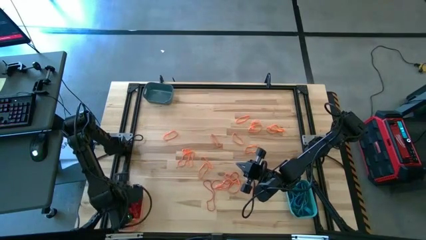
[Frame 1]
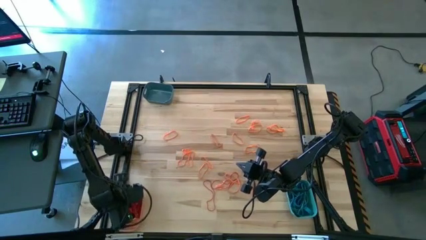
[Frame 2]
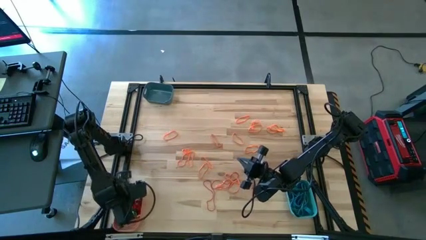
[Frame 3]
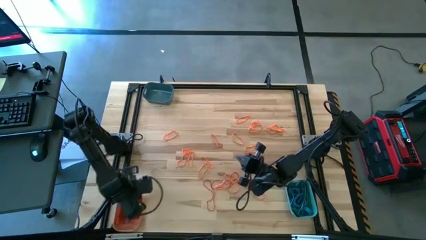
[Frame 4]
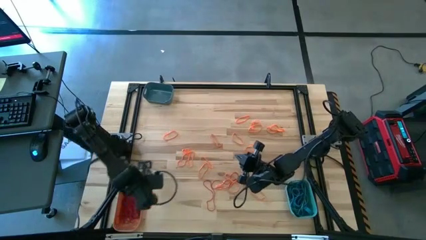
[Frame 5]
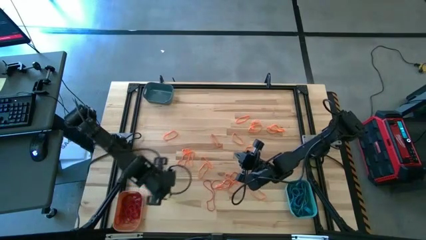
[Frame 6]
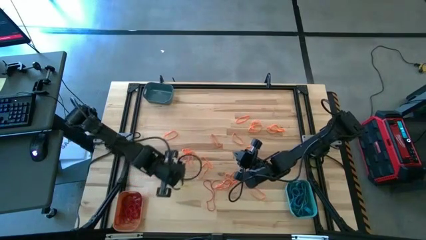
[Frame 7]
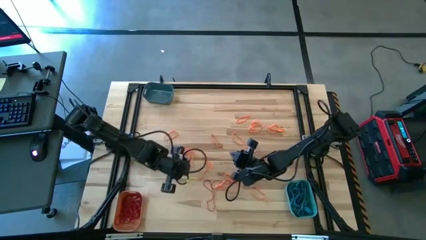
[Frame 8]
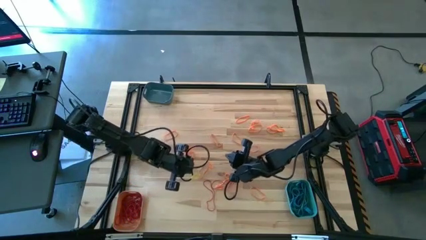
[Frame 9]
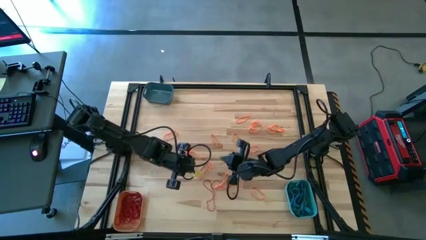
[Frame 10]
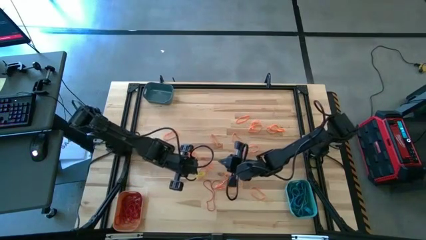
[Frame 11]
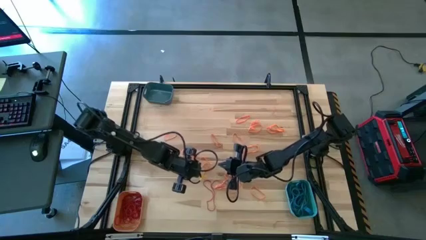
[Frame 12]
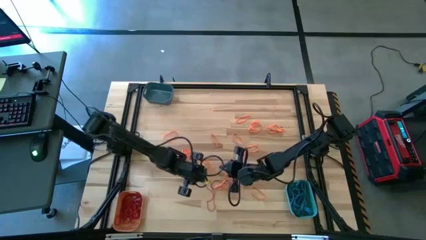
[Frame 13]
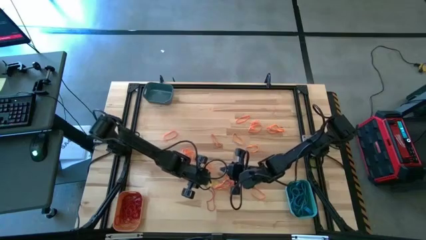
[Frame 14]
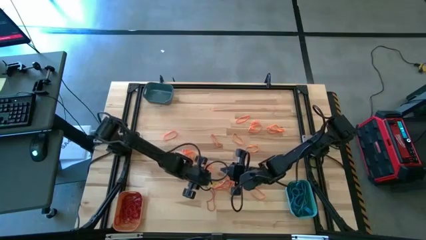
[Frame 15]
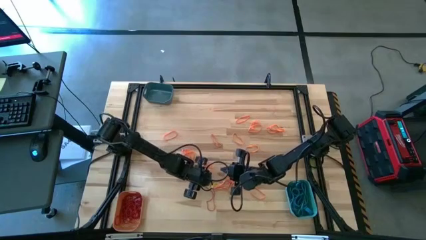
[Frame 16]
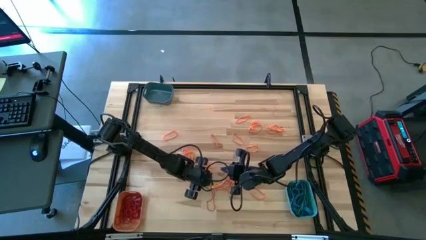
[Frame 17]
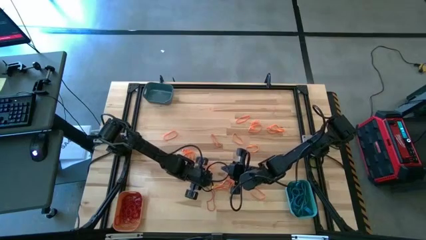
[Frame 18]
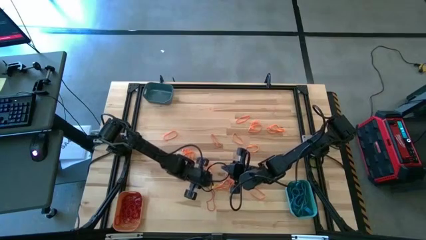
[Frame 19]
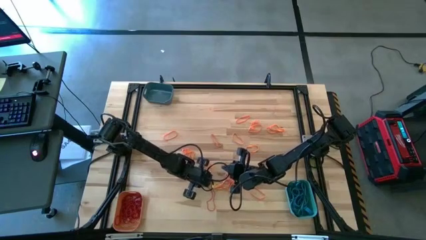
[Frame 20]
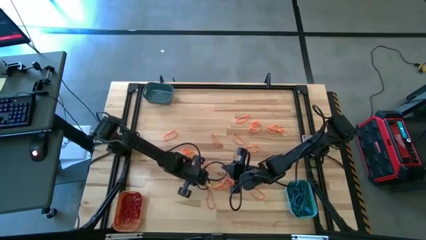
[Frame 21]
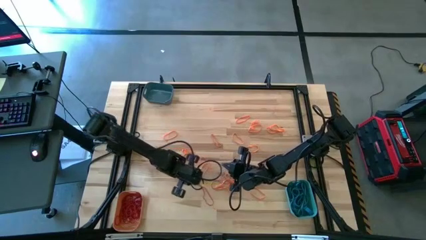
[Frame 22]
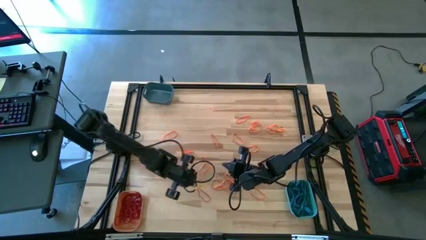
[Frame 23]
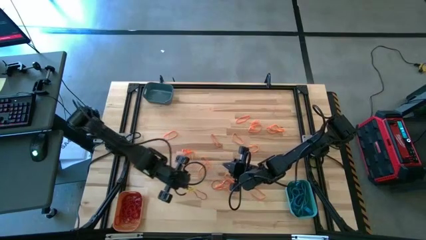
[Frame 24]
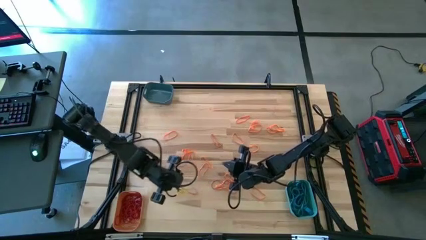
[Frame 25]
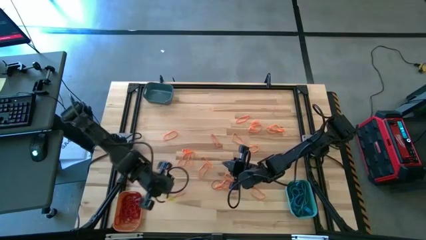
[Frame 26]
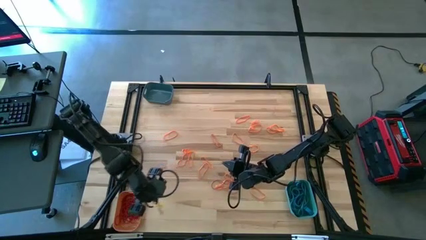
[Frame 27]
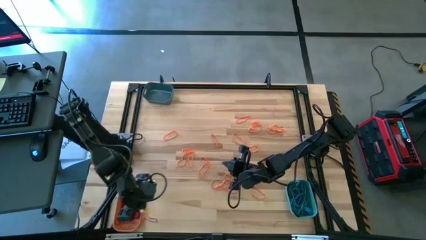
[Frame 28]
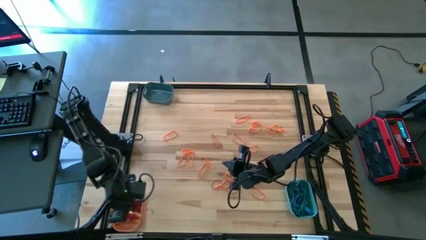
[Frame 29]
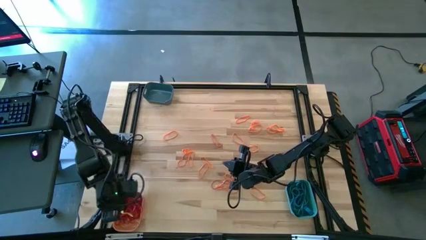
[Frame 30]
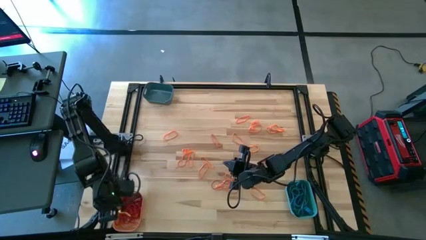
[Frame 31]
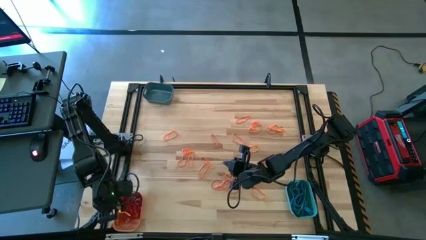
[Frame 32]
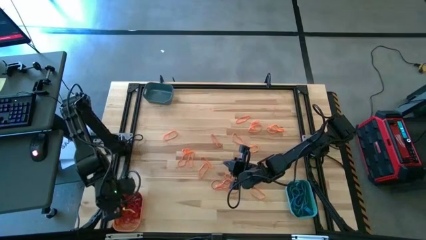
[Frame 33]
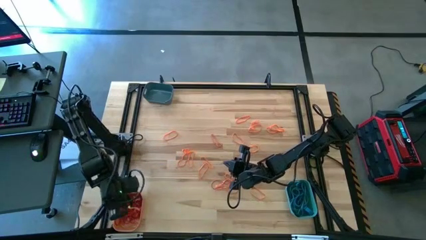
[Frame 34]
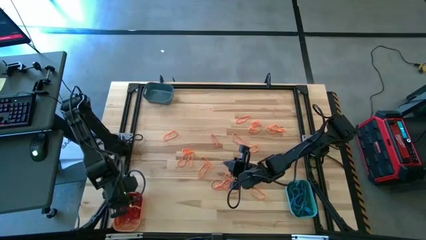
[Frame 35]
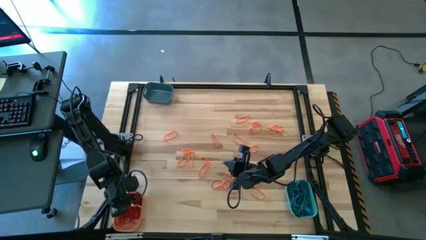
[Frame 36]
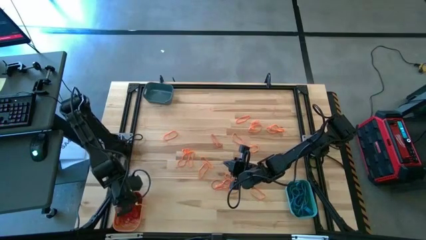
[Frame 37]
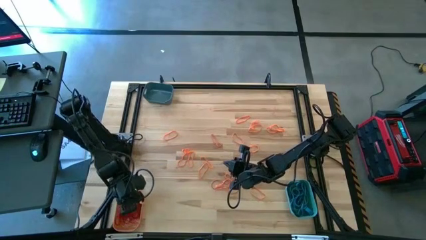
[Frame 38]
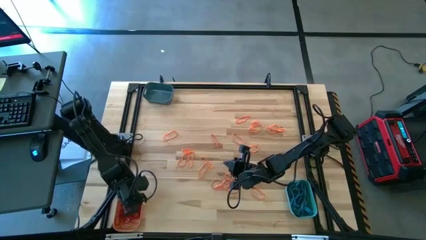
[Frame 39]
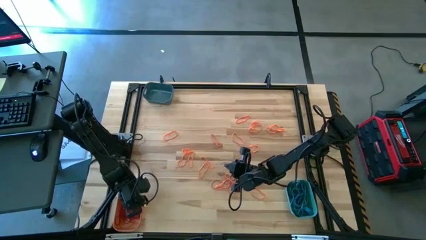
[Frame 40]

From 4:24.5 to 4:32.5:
Task: Sort rubber bands into baskets
Put the red rubber band into the orange bin

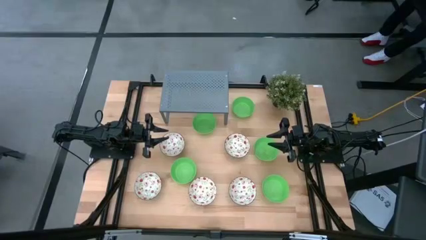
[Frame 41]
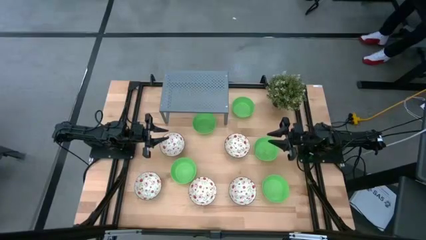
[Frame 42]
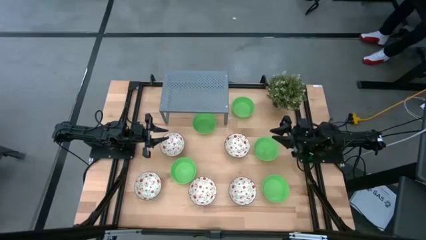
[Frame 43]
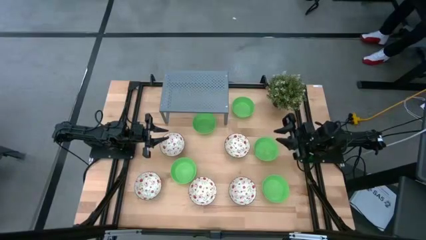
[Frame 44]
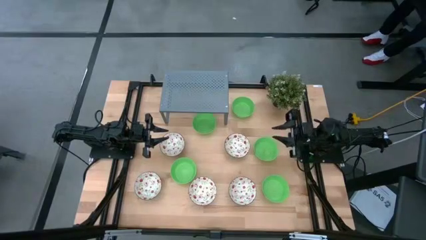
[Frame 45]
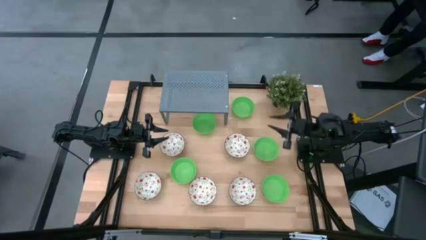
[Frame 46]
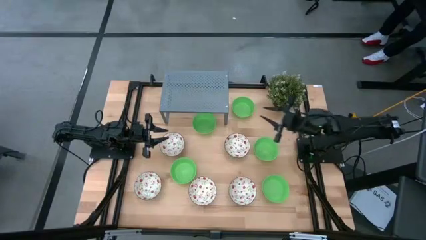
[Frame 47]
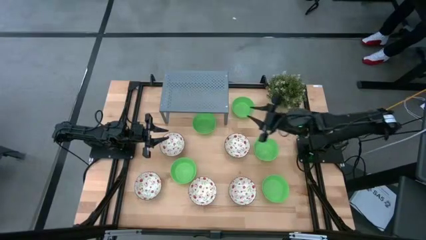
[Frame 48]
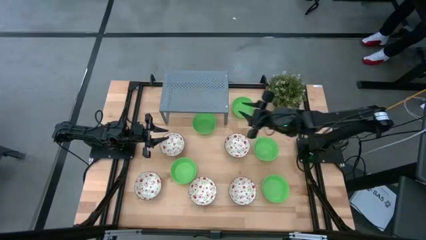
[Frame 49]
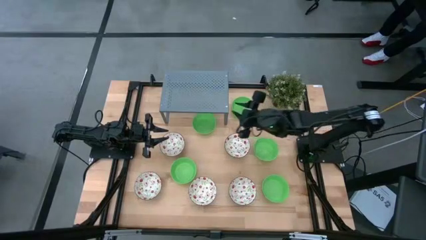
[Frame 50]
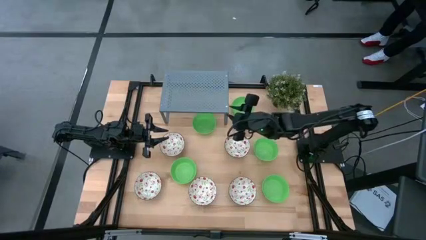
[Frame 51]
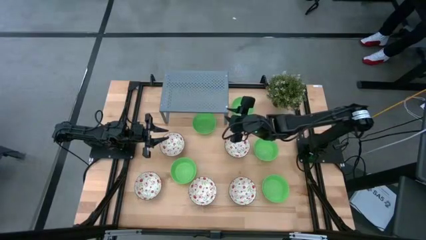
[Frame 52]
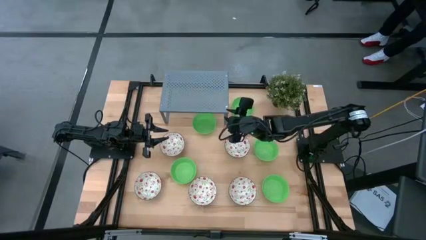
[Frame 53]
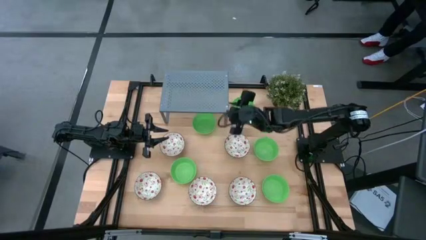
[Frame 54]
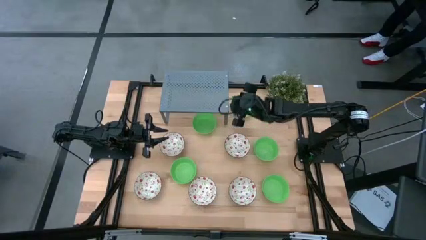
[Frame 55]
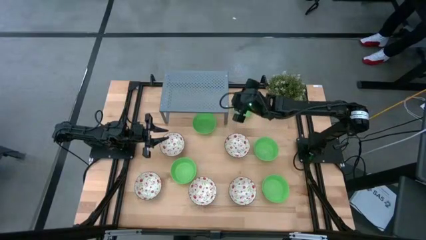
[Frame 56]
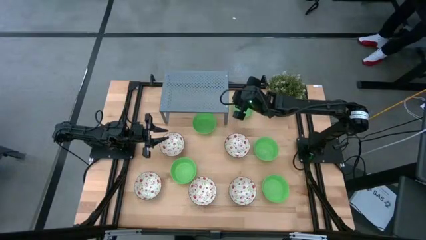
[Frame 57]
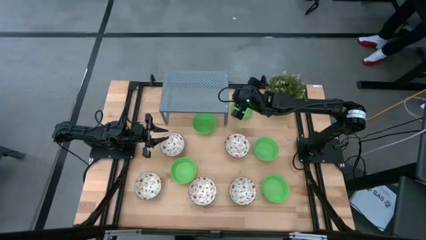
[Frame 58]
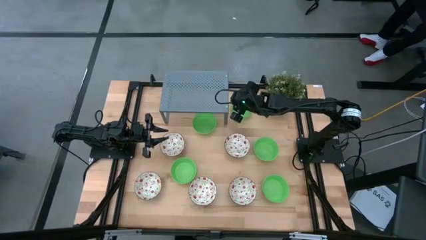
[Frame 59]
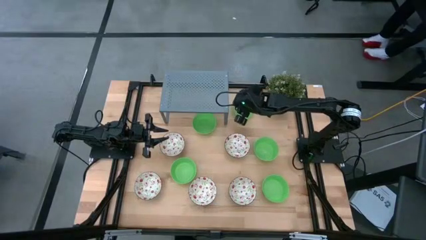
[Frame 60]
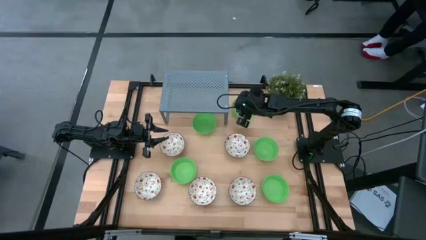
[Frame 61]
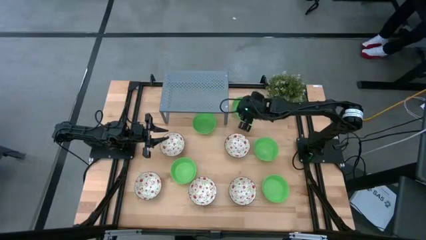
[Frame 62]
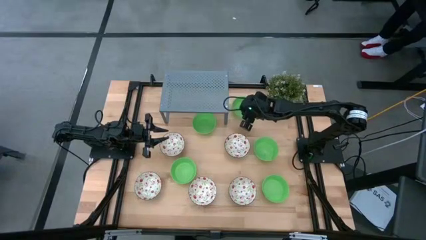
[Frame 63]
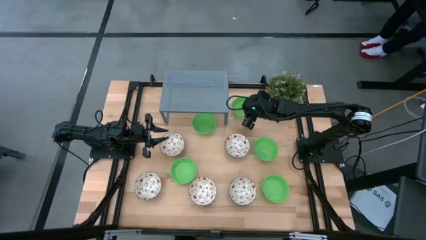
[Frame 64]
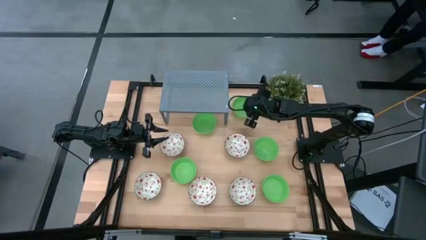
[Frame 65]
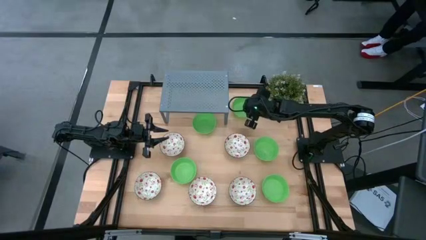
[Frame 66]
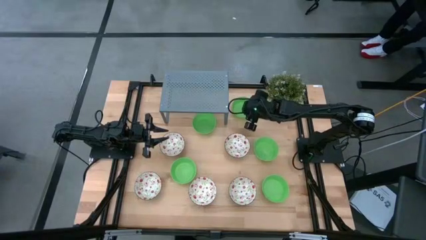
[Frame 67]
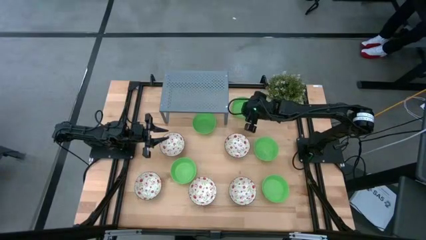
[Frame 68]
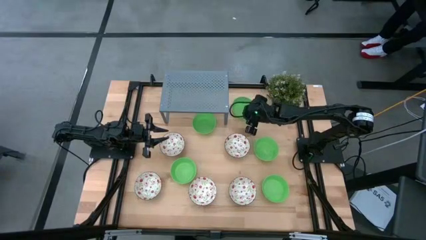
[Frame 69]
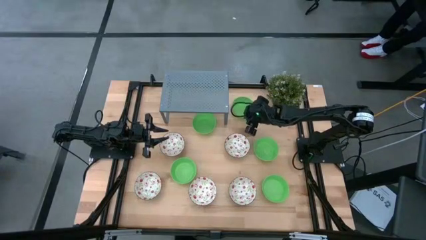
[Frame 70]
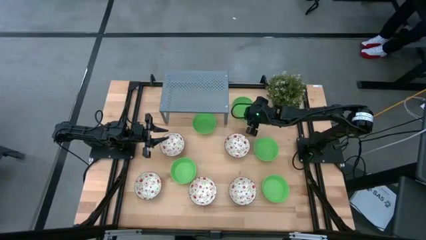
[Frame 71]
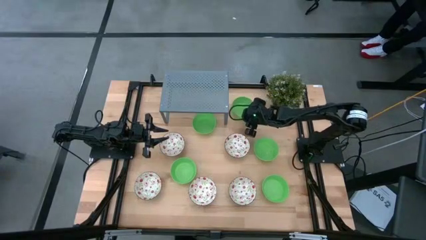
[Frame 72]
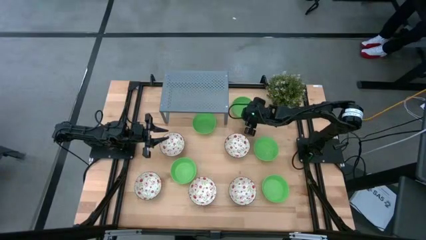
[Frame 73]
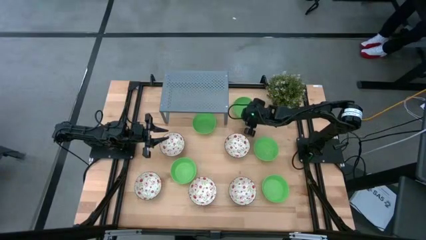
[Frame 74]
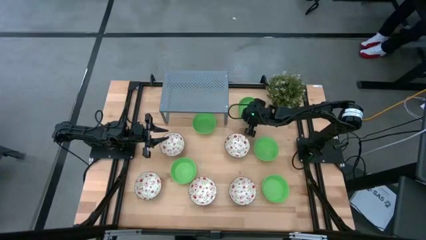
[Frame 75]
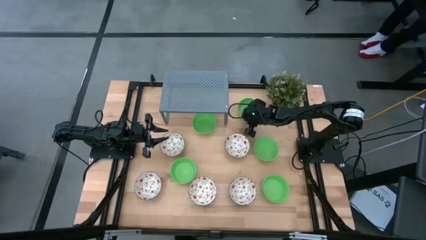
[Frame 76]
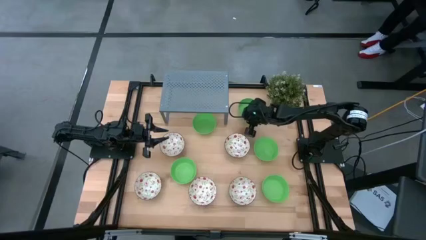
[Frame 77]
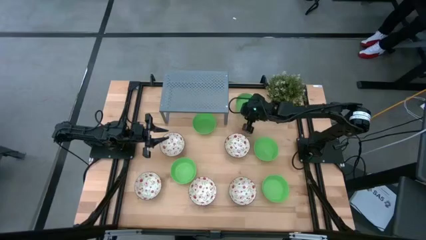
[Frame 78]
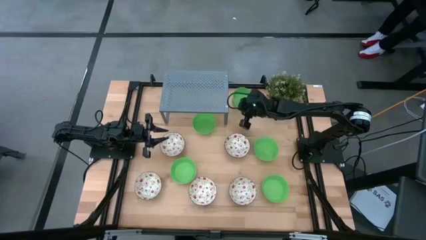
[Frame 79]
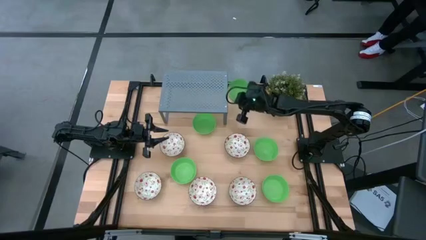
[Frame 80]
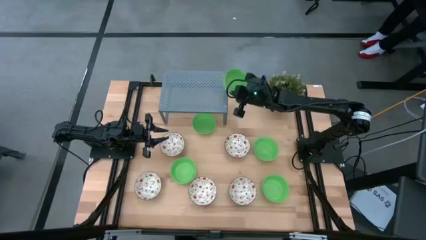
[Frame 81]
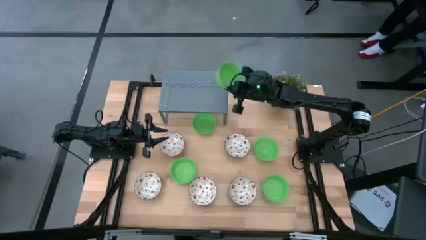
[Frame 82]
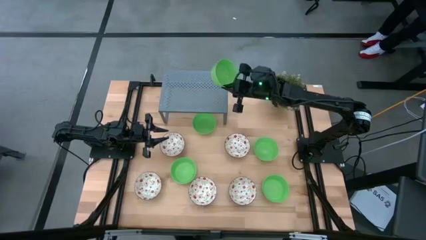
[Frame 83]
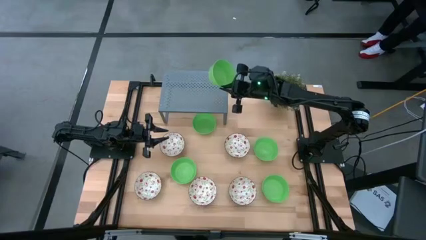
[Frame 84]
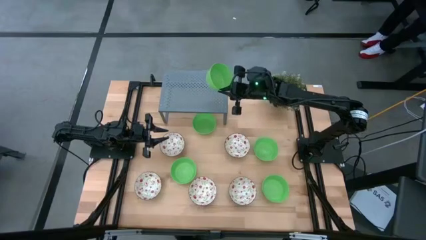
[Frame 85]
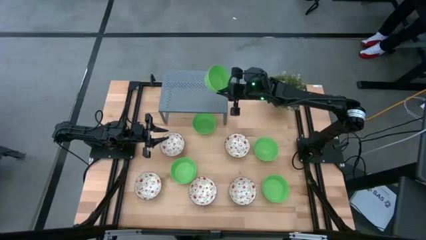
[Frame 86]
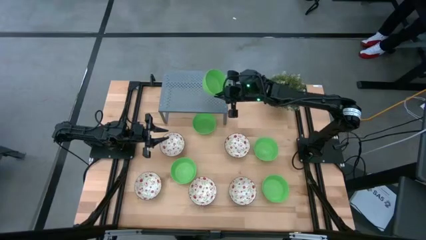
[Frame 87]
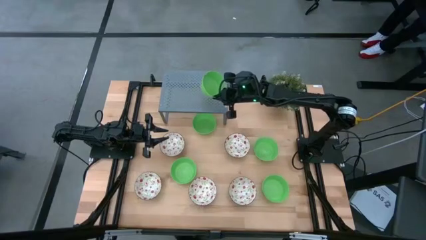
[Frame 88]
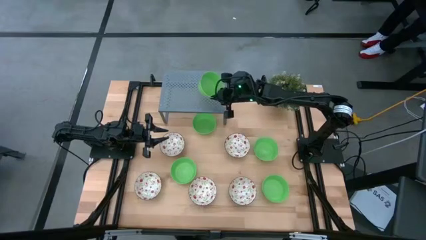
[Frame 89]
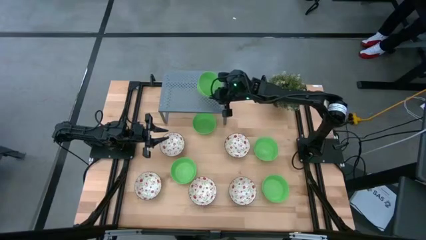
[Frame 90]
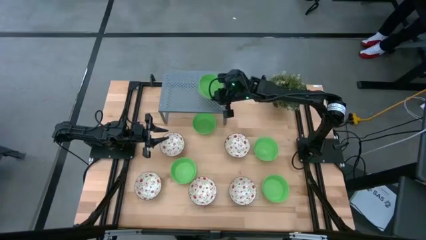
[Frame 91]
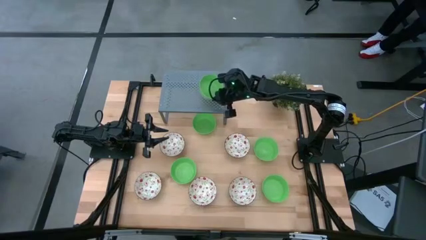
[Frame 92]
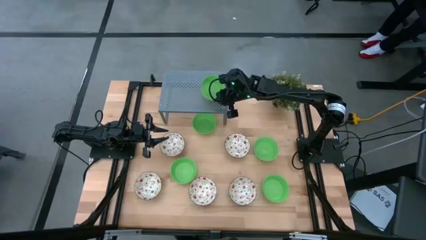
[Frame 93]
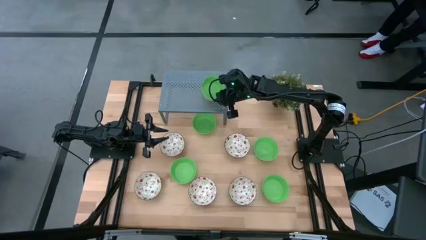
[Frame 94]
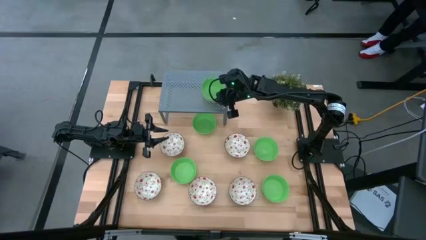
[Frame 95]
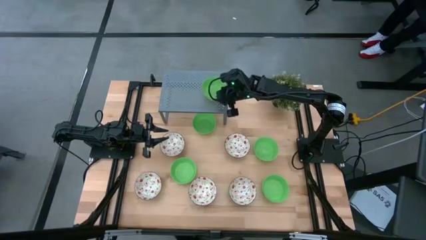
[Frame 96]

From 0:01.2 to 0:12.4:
Task: Pick & Place Mini bowls
Put the green bowl on the shelf
